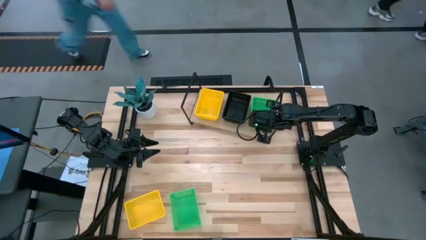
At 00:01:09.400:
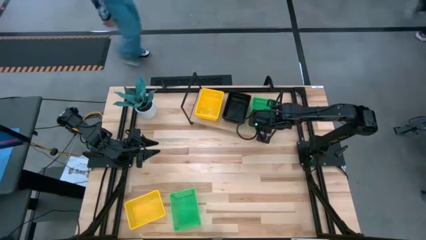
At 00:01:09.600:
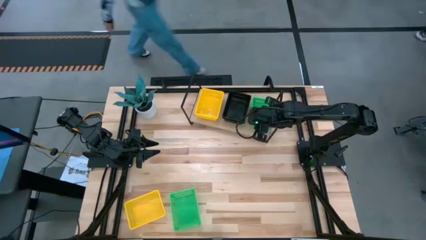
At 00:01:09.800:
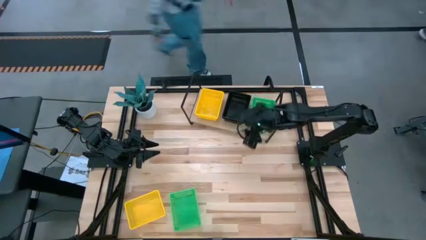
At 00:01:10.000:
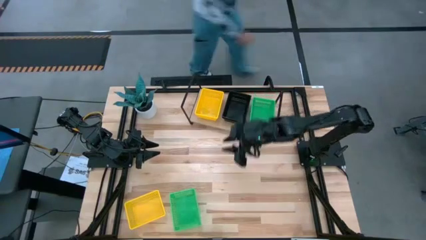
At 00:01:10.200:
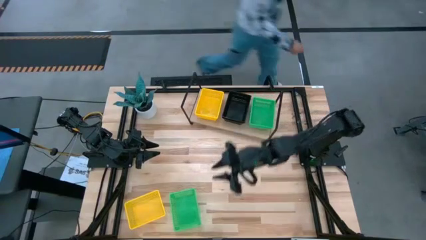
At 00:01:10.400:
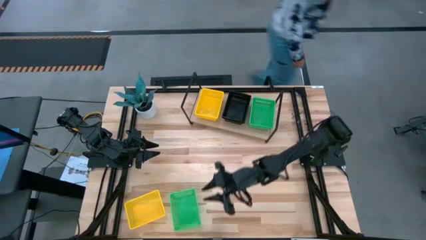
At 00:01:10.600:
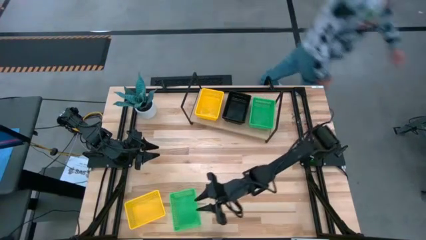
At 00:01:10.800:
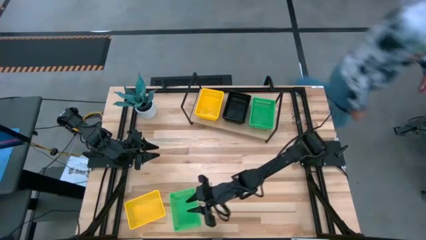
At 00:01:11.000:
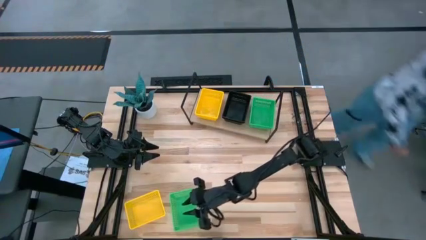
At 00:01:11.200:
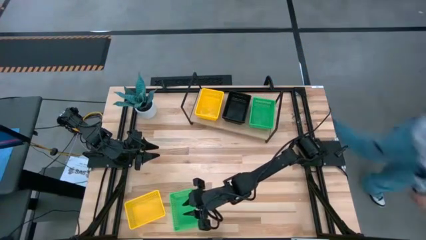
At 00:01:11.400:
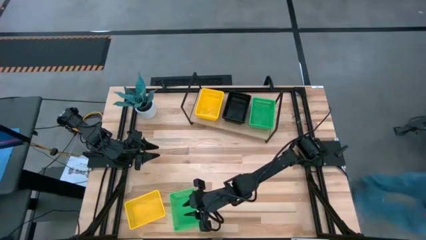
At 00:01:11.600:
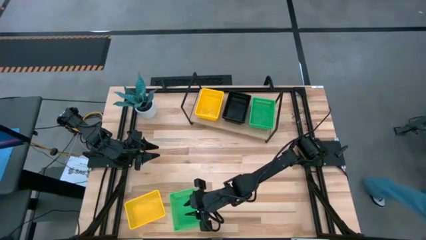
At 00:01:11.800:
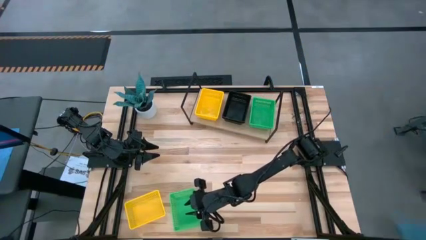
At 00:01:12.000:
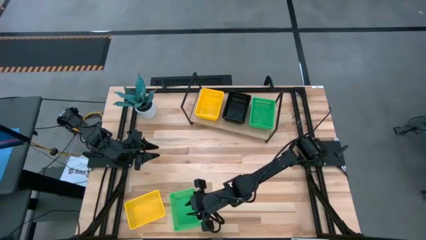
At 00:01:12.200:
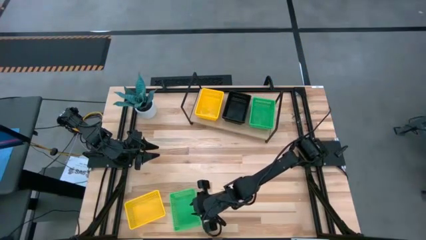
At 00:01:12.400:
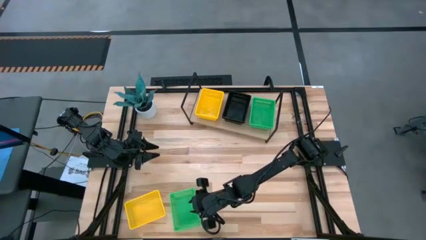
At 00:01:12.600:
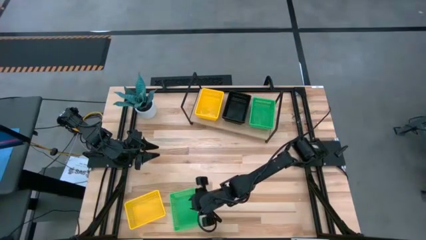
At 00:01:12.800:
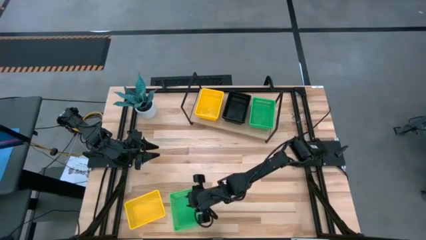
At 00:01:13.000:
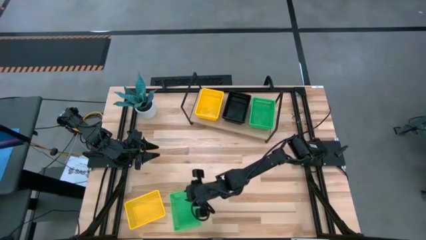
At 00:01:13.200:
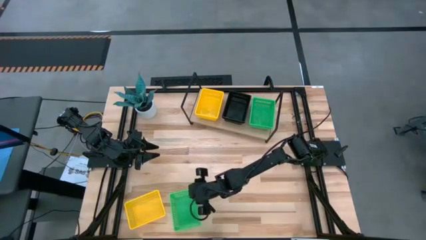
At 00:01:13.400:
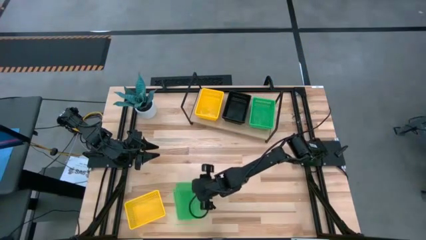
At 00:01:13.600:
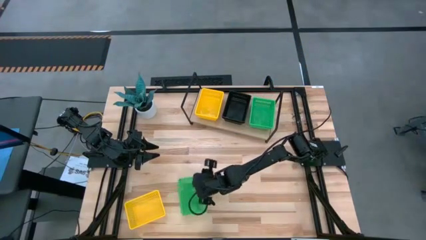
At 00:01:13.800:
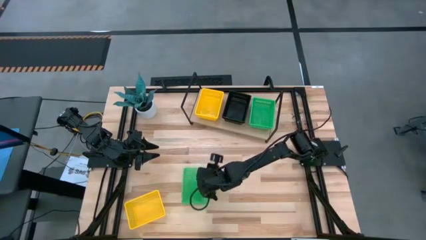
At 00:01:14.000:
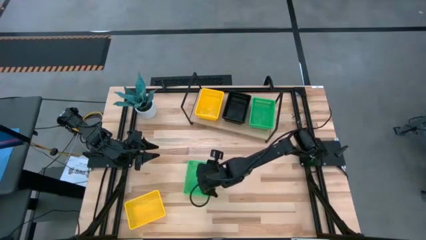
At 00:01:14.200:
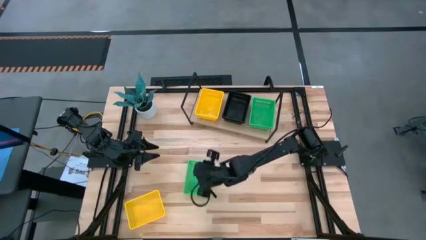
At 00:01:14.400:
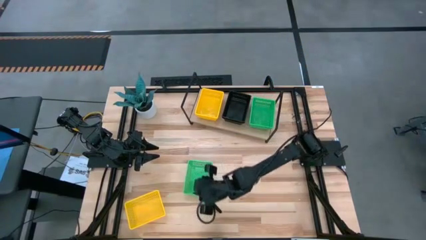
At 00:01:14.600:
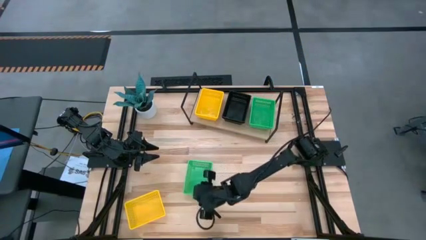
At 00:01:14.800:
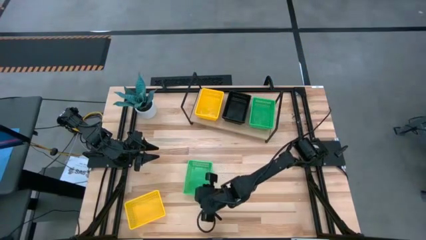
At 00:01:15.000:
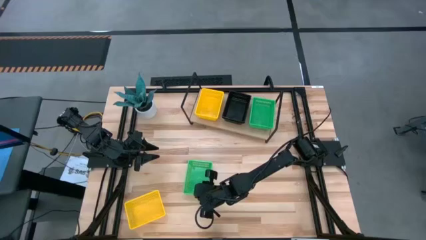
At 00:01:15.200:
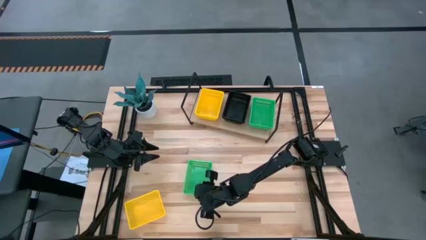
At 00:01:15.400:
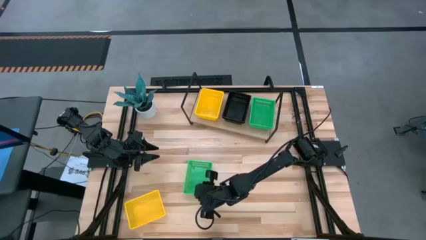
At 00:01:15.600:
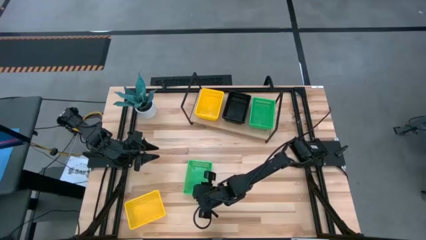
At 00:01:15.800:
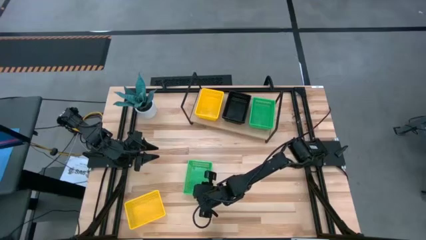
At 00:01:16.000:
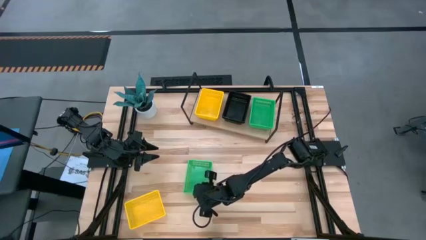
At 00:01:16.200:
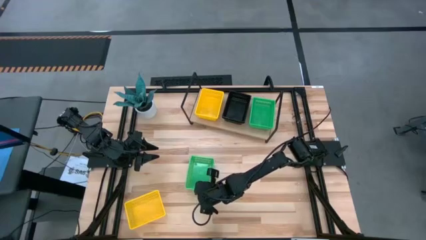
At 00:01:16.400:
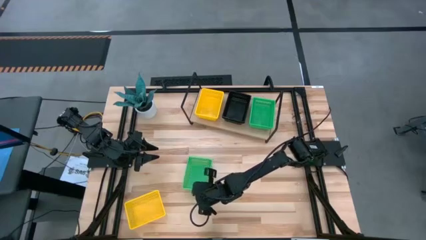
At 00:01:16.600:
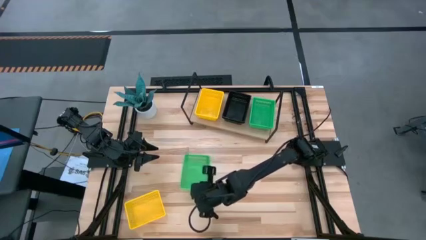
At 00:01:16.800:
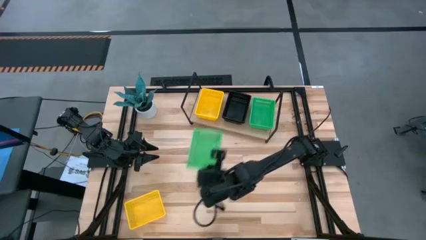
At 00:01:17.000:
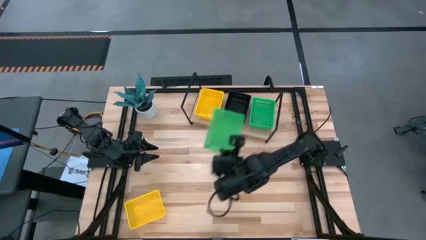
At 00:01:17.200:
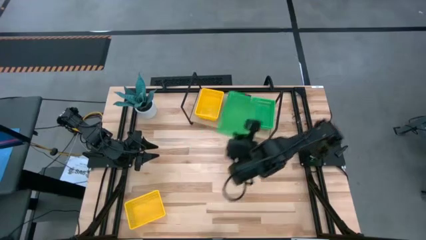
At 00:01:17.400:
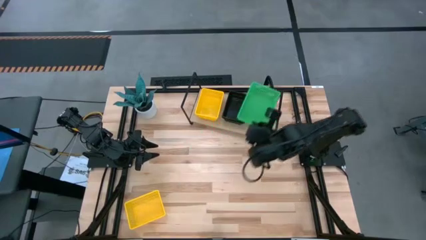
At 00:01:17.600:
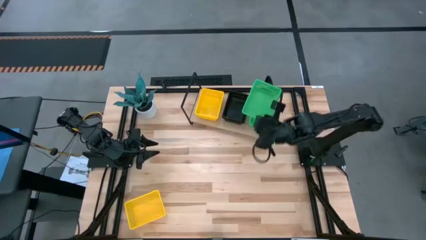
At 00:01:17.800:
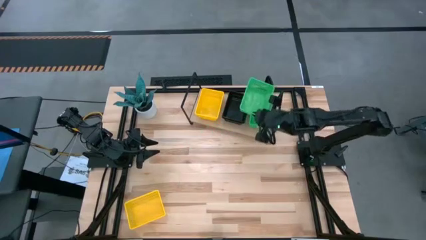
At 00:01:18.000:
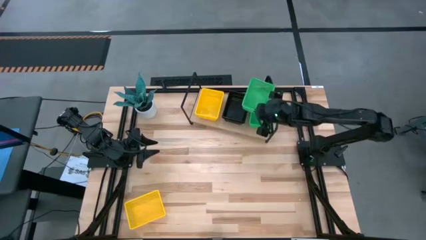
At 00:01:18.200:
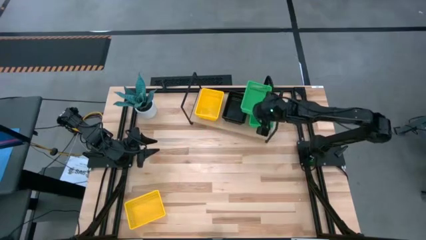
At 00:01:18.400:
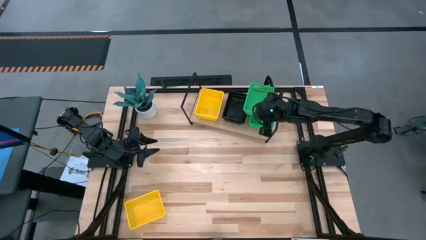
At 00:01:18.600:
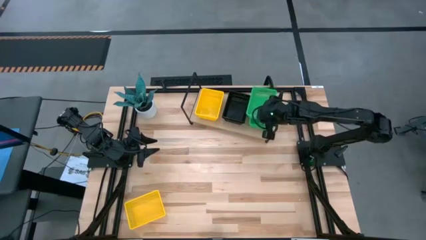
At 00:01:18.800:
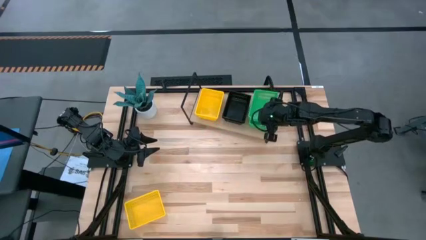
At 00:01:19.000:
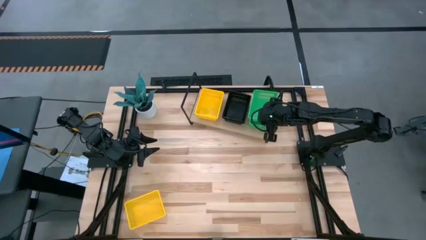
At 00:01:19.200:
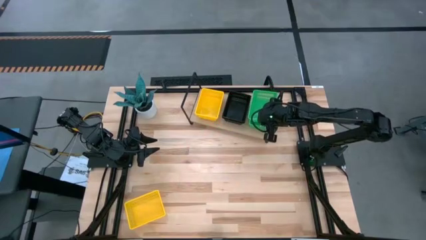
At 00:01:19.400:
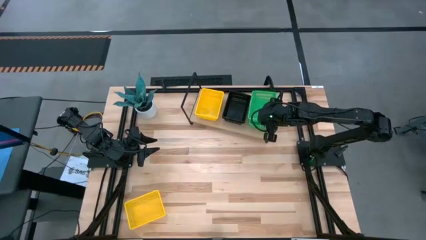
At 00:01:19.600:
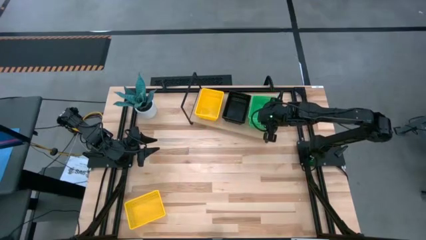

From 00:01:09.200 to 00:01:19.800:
Task: Stack baskets on shelf by color
Stack the green bin on top of the green bin on the shelf

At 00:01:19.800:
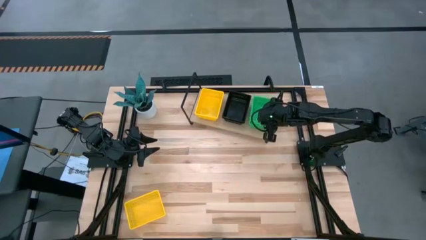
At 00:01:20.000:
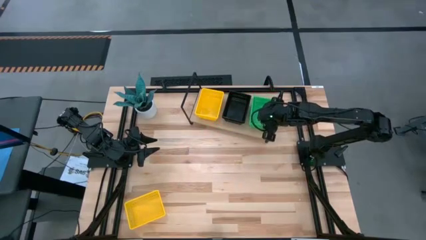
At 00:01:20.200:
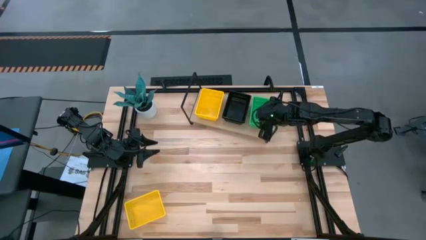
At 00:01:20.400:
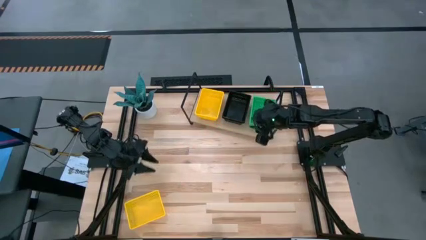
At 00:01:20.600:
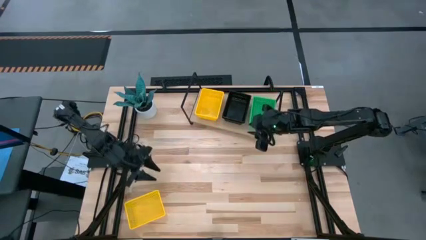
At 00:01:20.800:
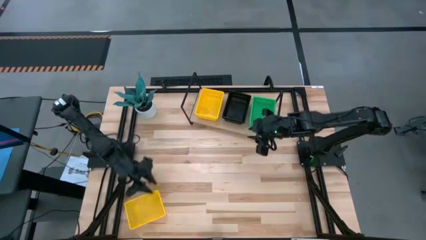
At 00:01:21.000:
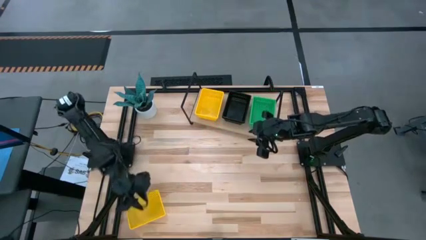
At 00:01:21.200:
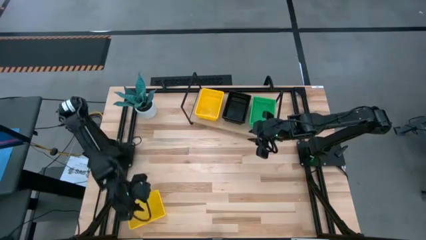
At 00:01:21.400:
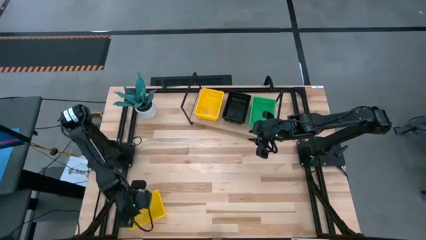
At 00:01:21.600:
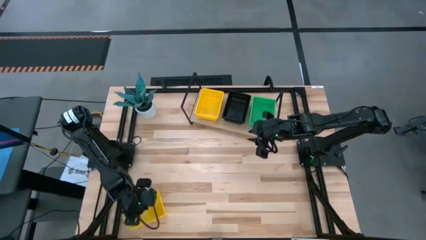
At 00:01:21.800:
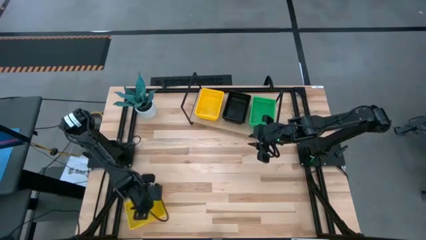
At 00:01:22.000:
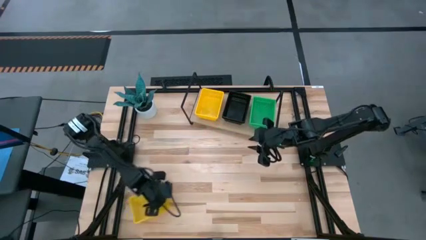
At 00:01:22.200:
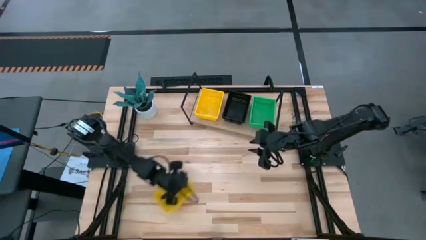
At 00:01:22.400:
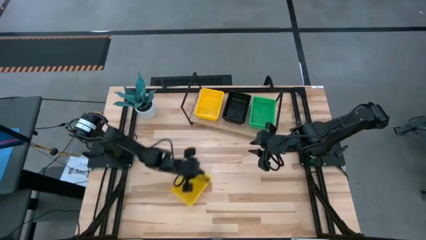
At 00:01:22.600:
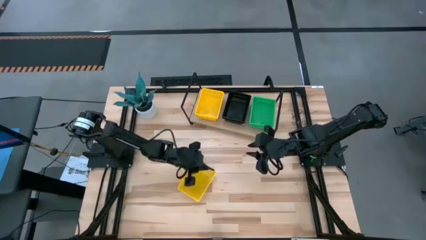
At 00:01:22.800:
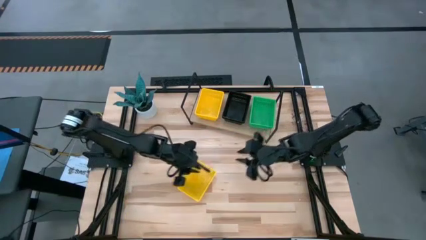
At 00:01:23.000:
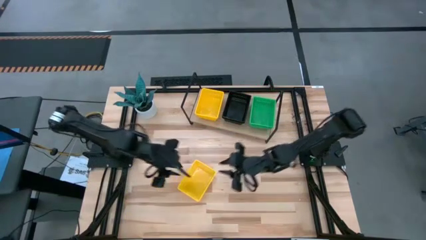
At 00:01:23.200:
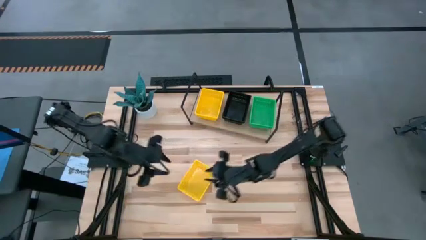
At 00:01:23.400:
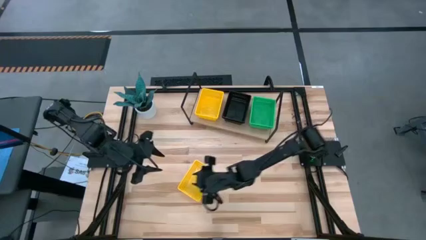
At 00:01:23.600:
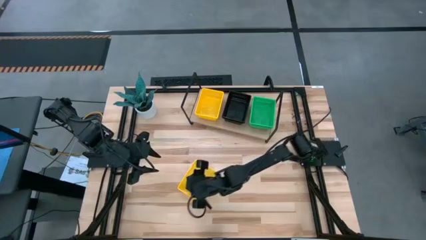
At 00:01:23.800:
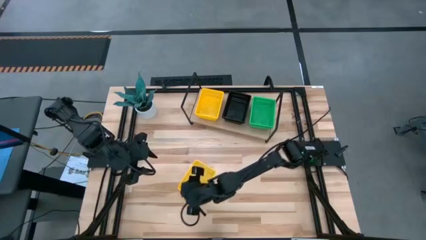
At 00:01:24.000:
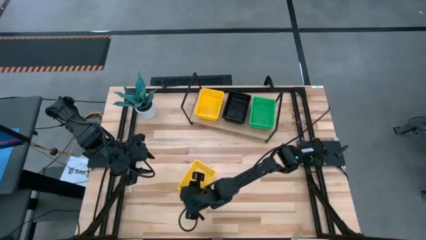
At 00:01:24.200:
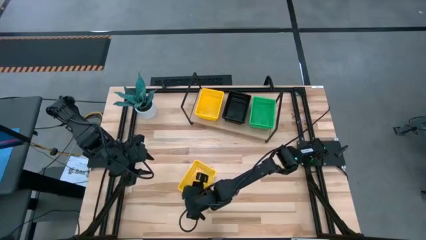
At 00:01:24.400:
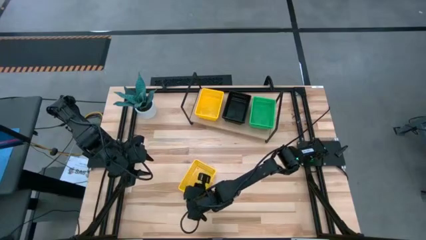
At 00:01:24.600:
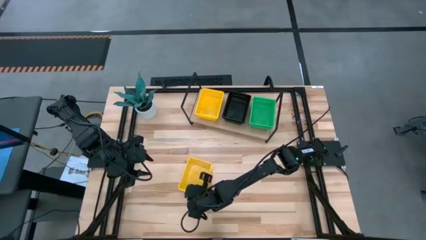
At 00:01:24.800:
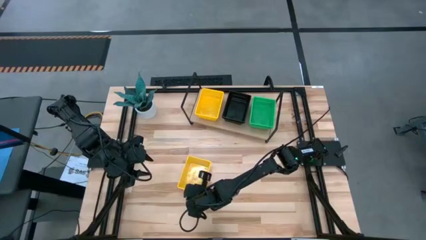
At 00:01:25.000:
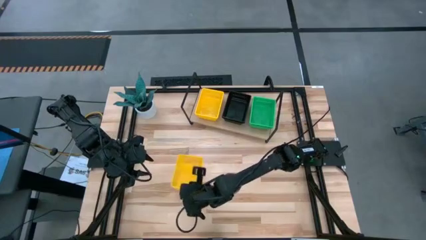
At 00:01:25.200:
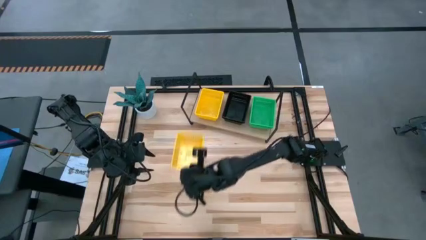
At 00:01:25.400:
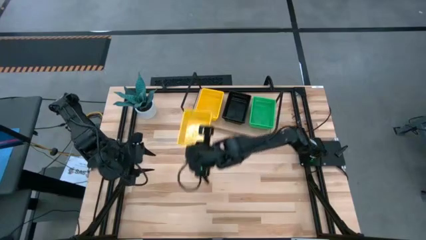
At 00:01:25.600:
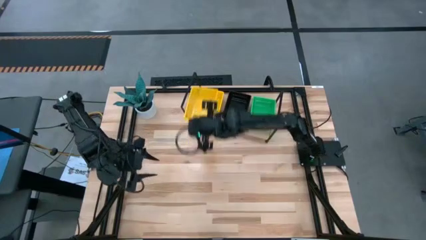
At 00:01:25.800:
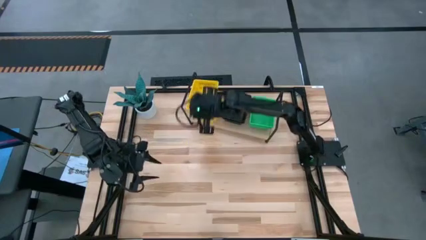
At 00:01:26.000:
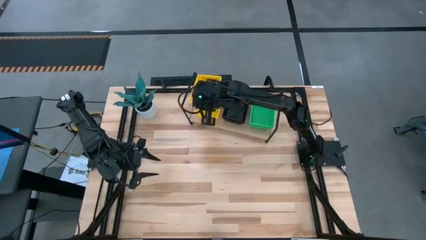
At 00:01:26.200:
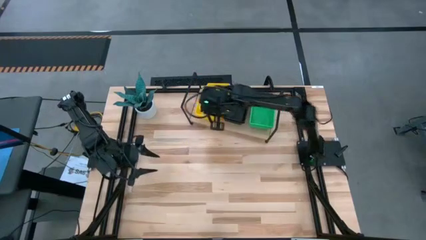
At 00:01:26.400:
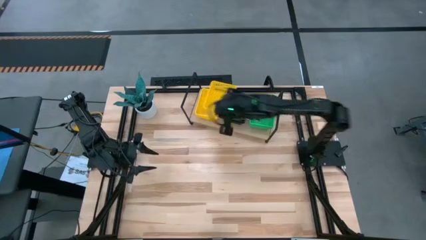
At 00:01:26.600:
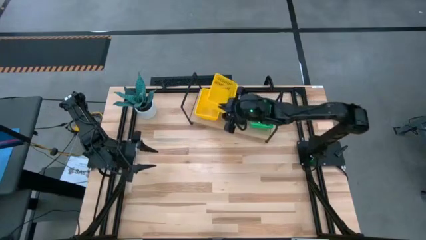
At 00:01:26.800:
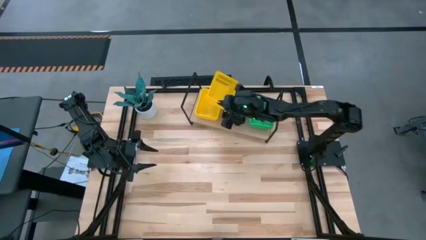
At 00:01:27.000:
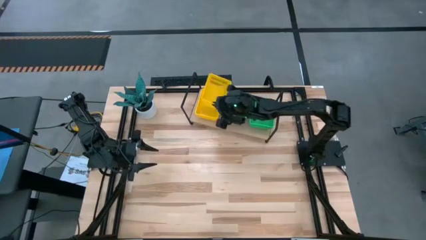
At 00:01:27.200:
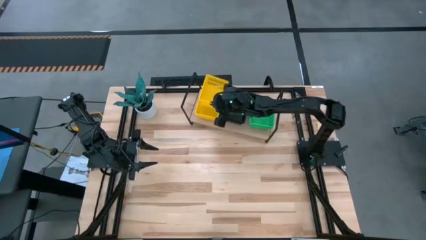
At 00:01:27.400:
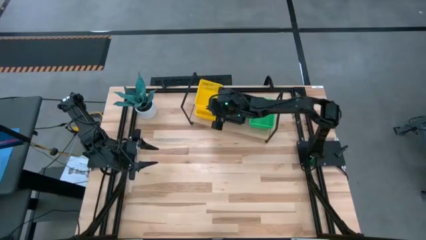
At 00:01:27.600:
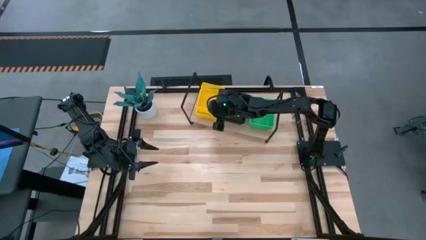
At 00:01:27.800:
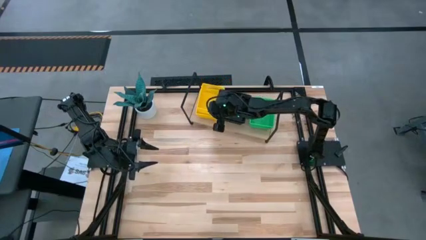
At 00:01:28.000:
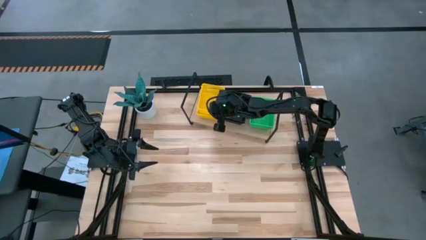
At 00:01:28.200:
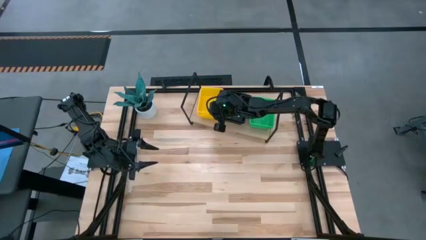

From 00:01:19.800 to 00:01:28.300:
Stack the yellow bin on top of the yellow bin on the shelf
